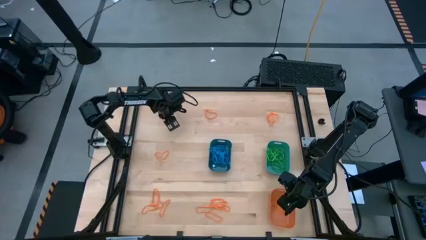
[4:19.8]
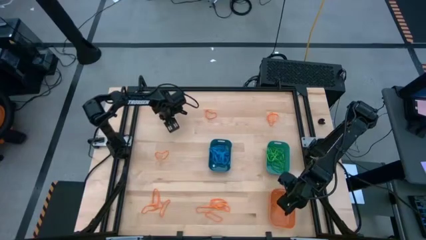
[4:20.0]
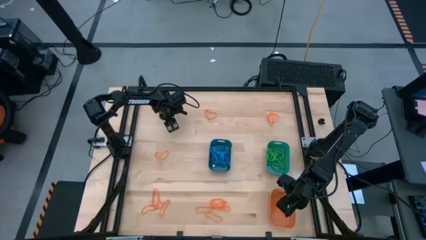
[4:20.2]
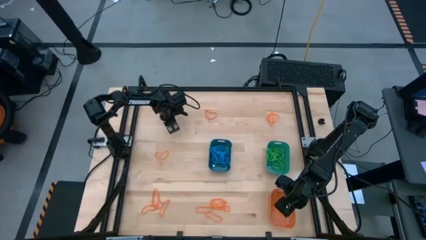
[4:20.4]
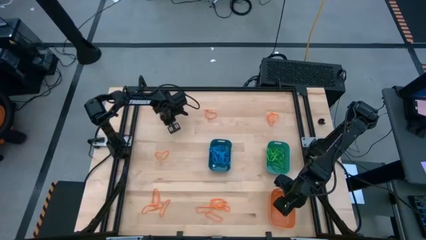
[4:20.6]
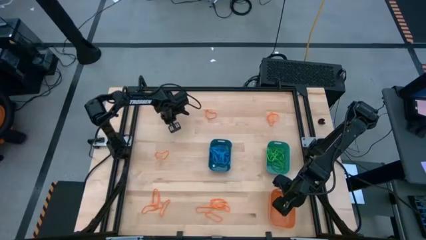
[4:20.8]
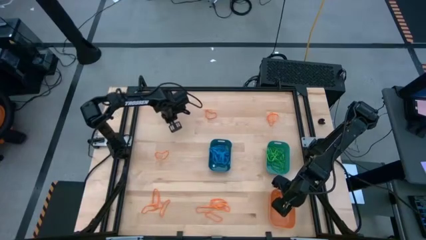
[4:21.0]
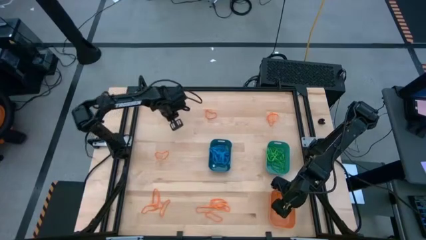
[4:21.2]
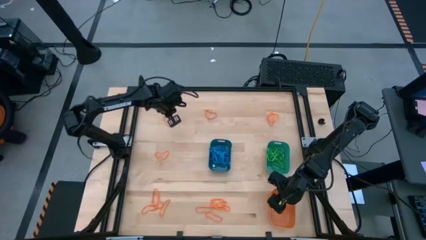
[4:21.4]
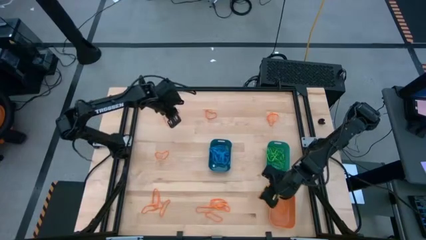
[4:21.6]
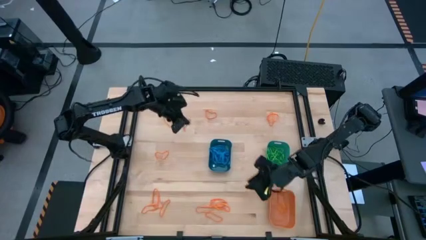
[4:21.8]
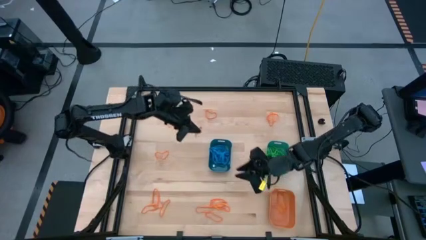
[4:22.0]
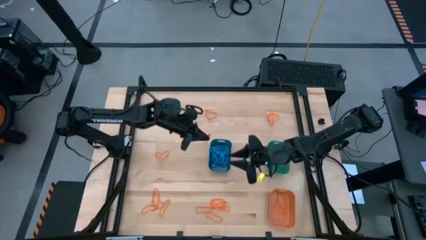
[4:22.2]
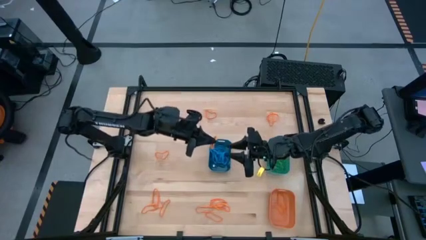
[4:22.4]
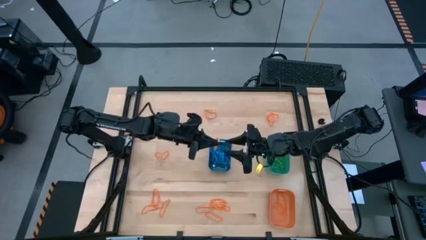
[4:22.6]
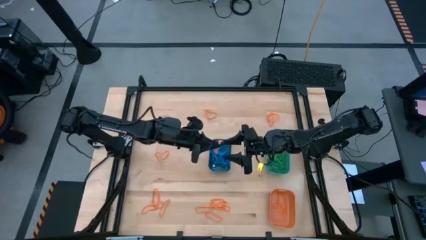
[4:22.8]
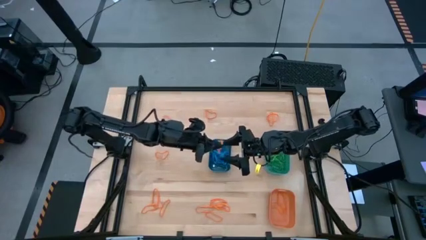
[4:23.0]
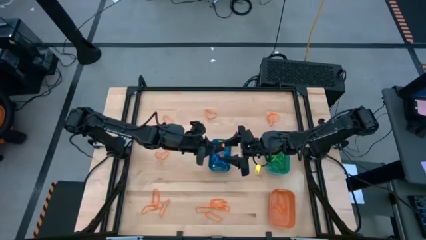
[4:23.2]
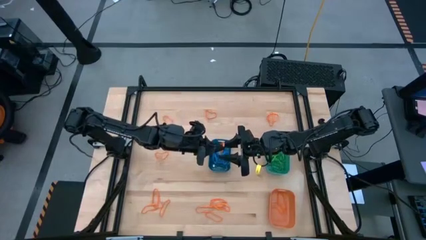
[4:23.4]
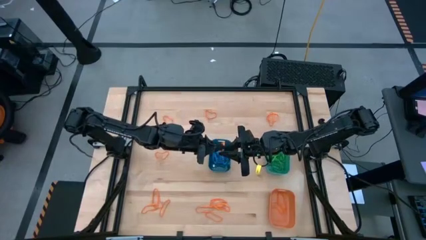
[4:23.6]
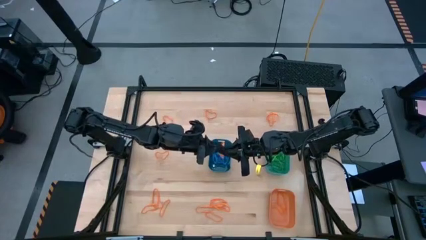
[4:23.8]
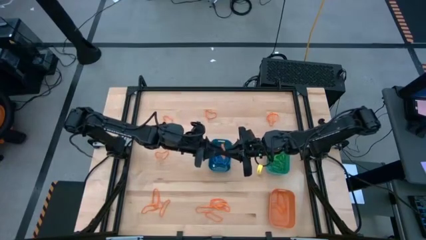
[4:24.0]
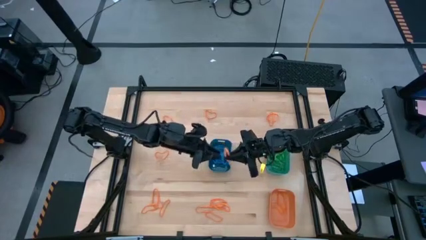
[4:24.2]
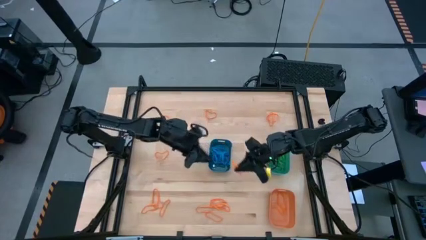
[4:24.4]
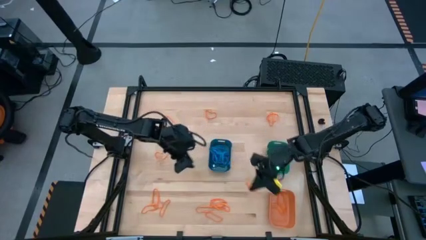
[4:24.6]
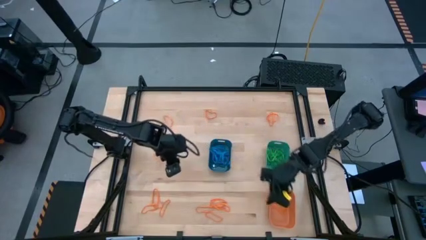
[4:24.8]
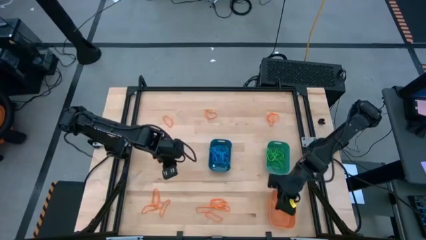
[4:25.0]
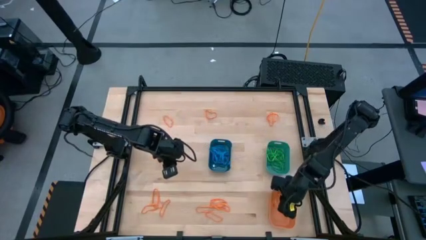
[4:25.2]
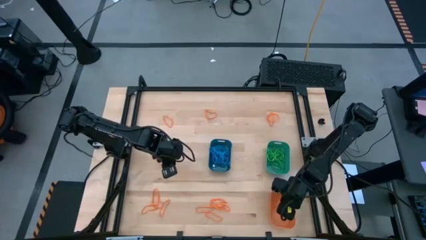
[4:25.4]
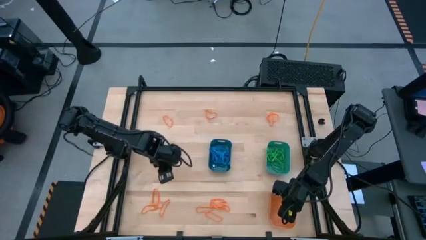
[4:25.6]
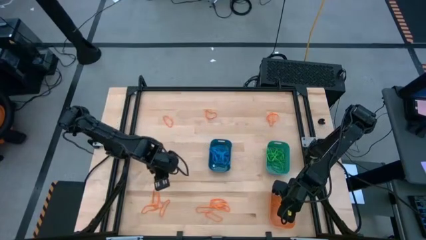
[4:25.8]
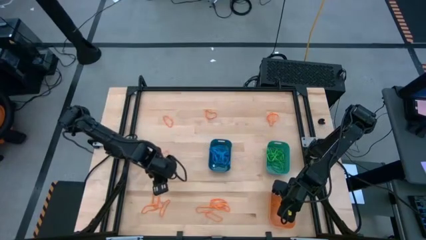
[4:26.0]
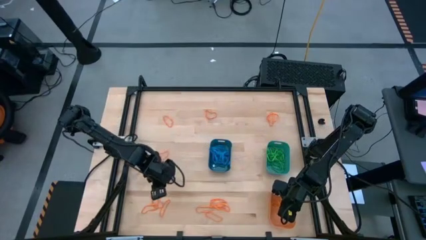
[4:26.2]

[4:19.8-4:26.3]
Task: Sort rubber bands into baskets
Put the orange rubberband into the orange bin

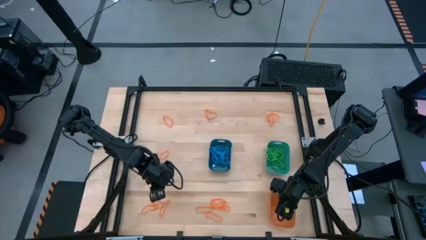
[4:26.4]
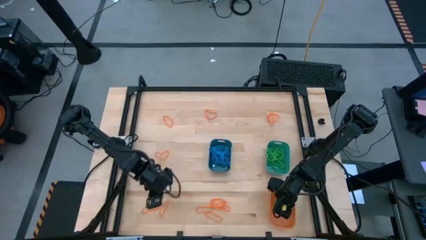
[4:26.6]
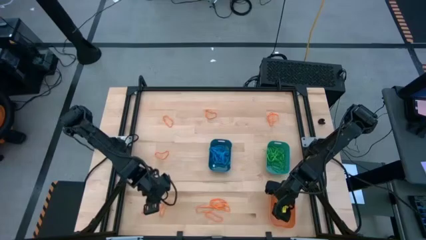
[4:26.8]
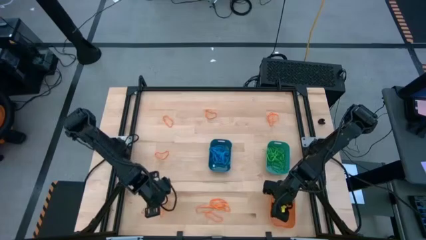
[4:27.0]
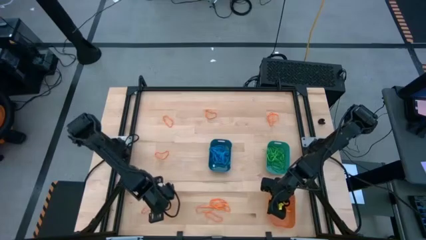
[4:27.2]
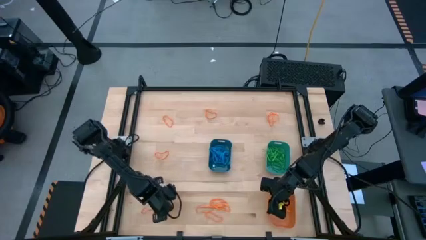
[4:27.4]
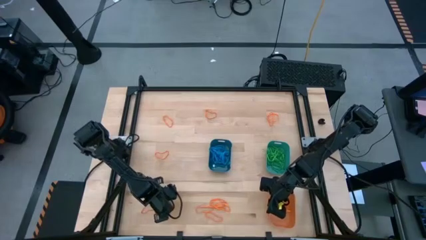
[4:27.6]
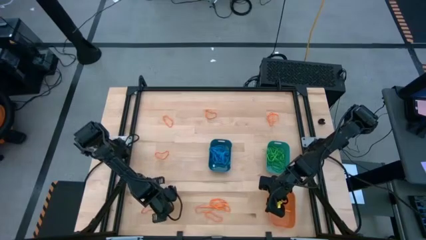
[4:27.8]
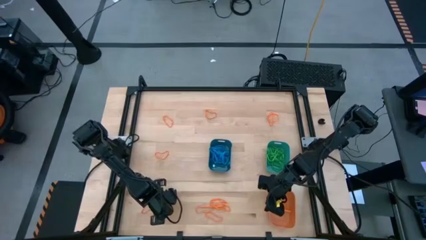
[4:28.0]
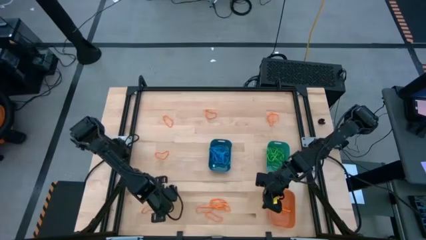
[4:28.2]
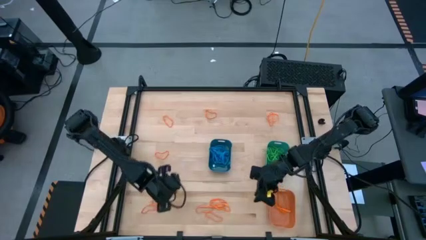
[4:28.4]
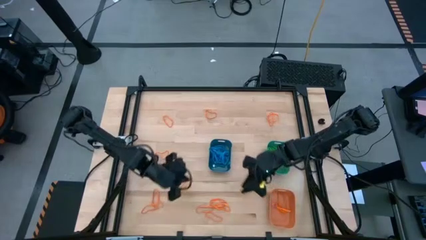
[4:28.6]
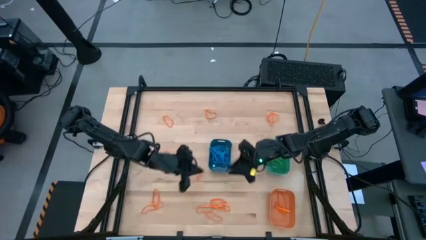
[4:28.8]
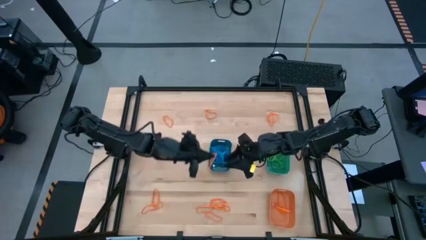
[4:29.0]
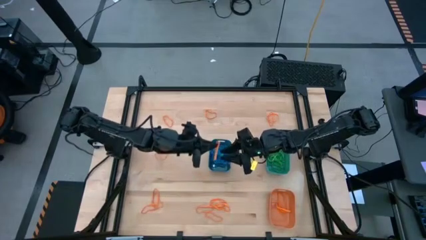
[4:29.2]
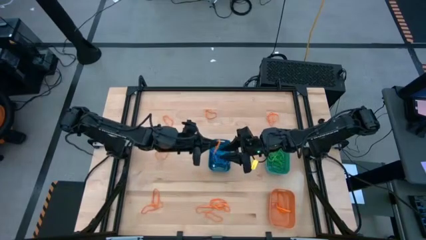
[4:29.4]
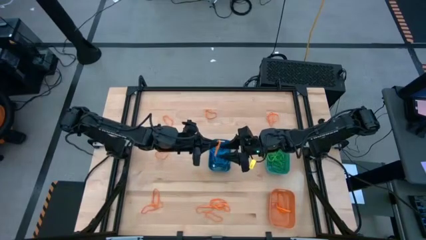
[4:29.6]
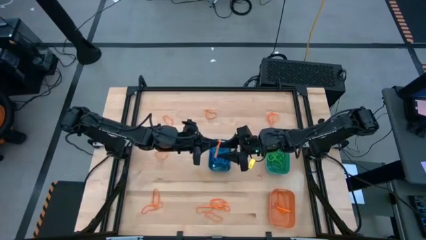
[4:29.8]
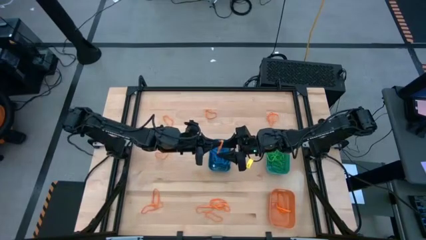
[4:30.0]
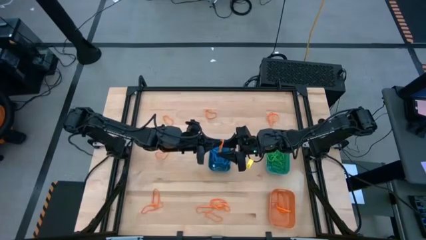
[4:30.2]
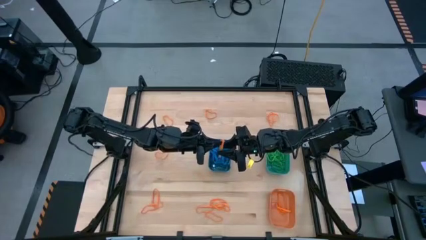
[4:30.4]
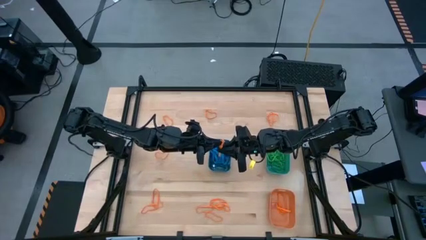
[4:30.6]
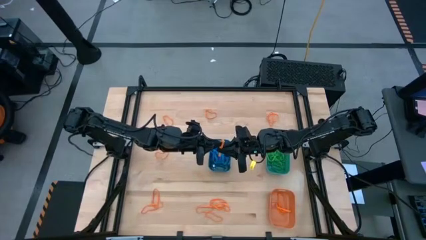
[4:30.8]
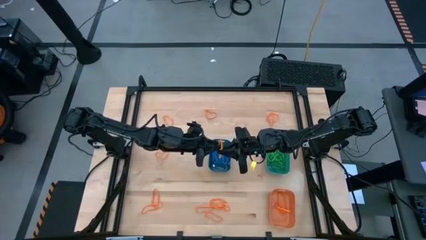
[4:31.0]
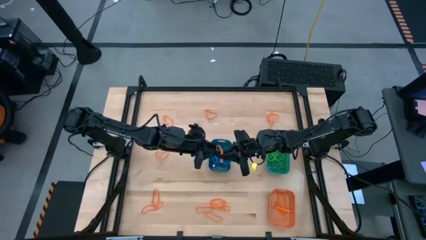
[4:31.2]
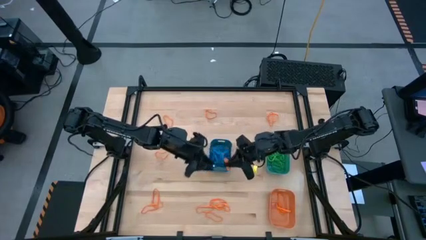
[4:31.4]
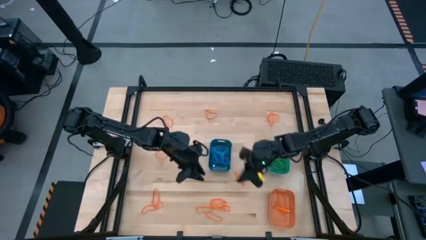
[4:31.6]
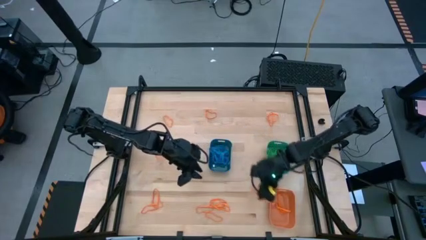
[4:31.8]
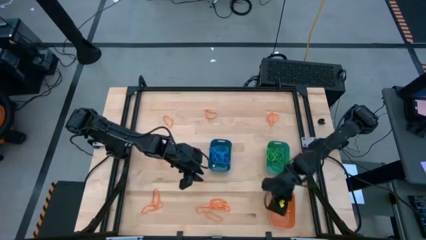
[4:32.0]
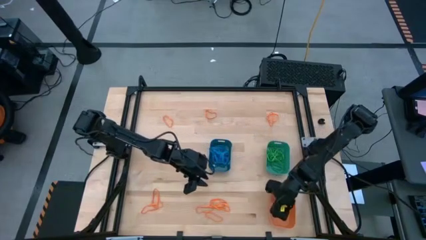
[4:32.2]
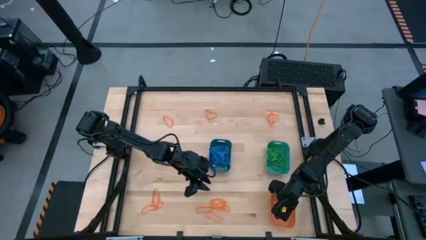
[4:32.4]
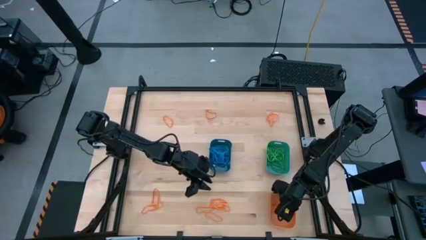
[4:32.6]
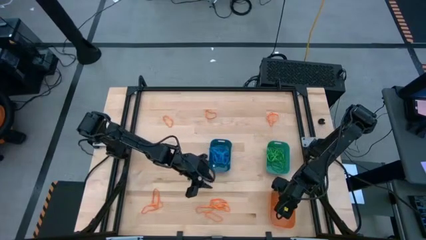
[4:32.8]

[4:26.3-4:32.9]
Put the orange rubberband into the orange bin

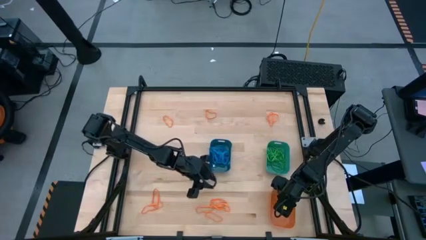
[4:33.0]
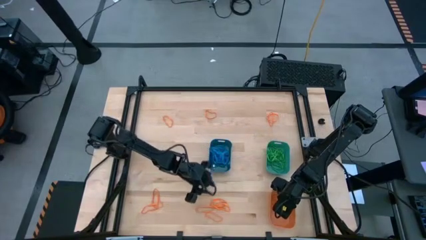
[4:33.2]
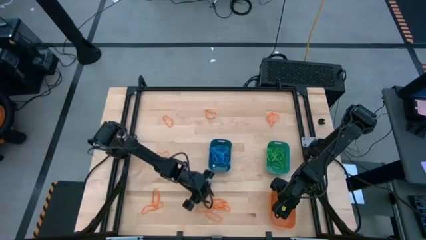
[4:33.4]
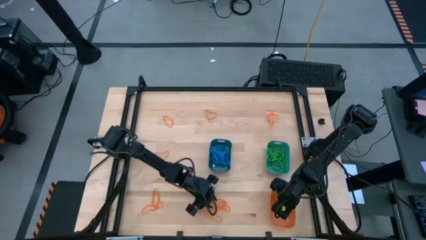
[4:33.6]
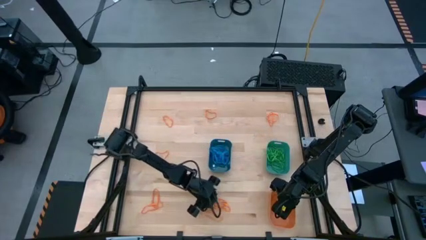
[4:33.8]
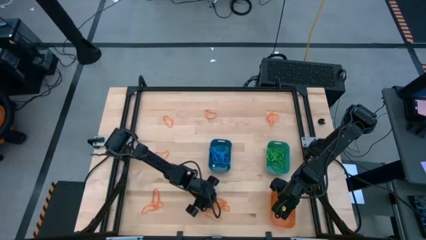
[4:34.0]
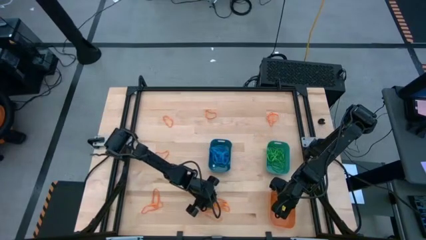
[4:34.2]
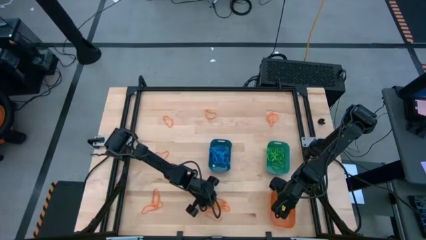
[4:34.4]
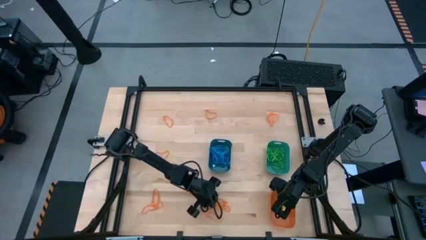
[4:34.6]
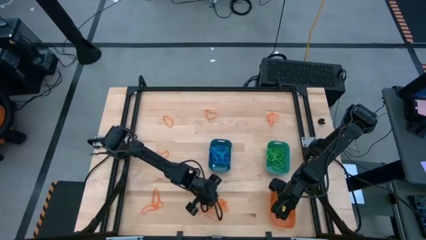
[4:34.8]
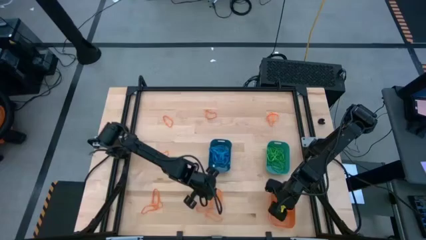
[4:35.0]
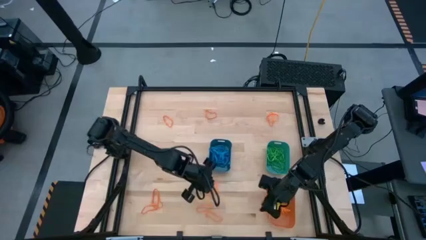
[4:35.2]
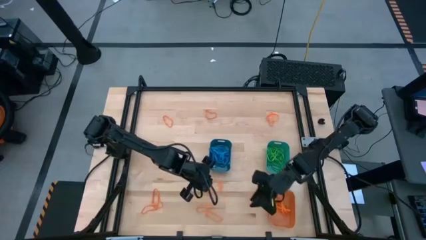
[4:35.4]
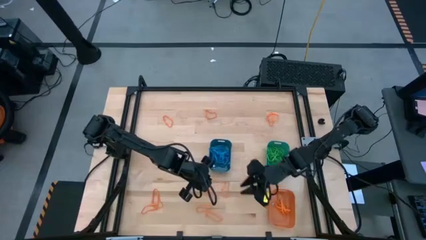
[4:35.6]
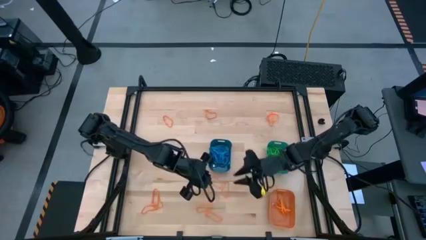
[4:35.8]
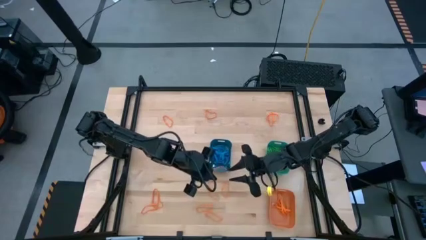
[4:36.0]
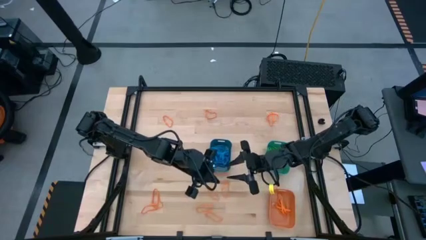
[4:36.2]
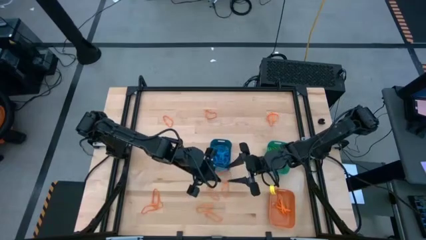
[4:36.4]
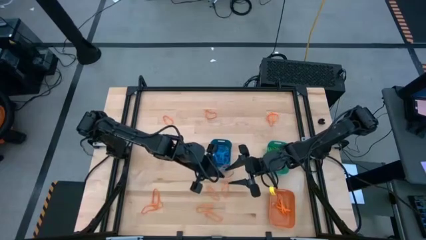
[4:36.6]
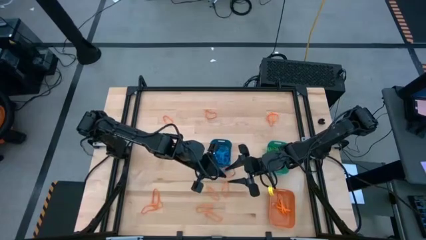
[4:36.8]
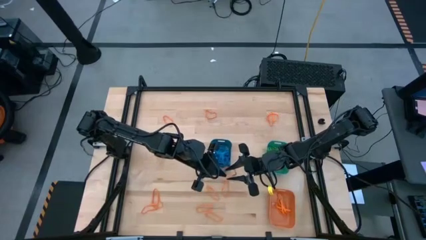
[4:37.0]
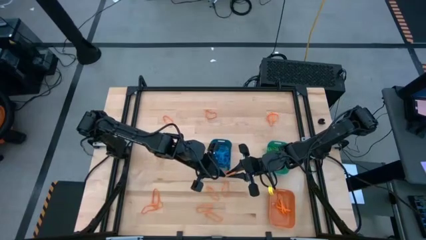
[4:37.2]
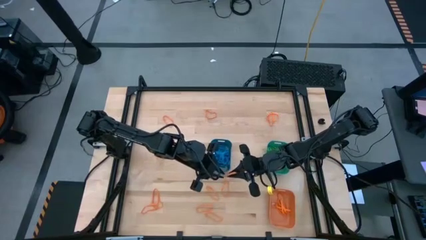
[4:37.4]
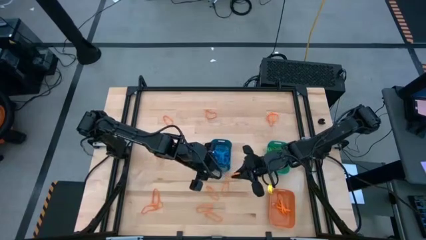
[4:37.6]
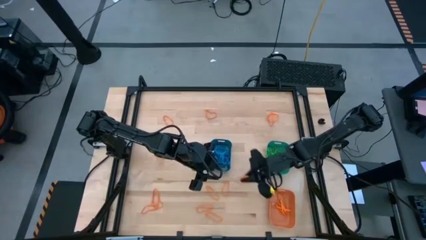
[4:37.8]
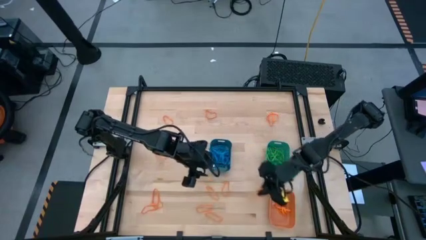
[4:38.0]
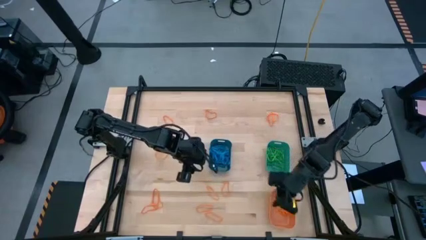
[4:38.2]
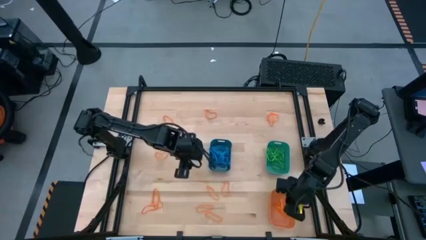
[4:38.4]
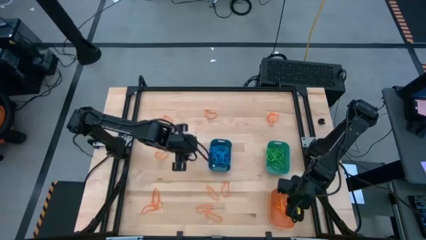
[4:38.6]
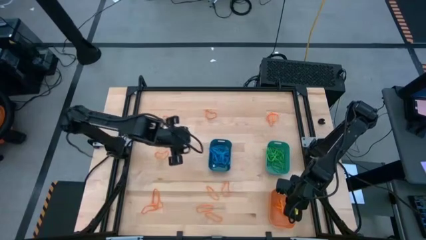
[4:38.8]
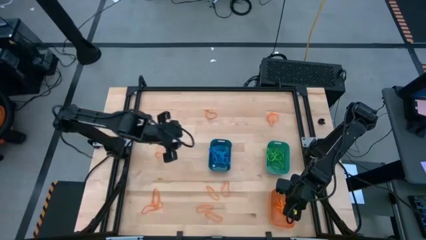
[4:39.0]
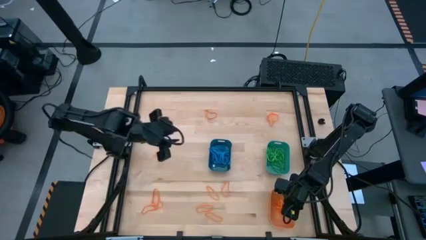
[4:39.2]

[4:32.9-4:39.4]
Put the orange rubberband into the orange bin
